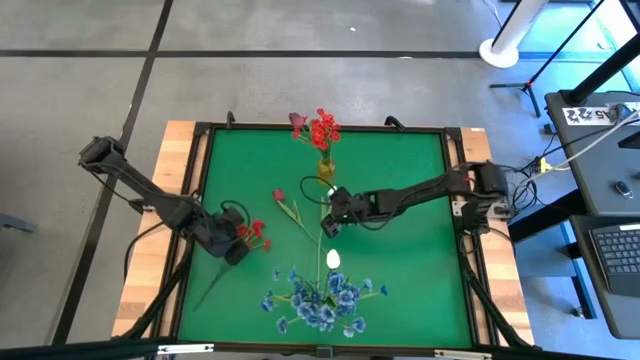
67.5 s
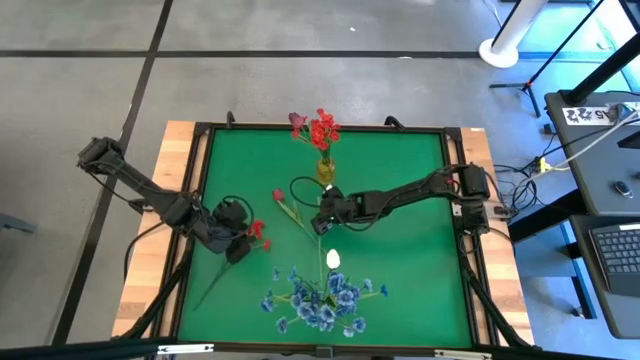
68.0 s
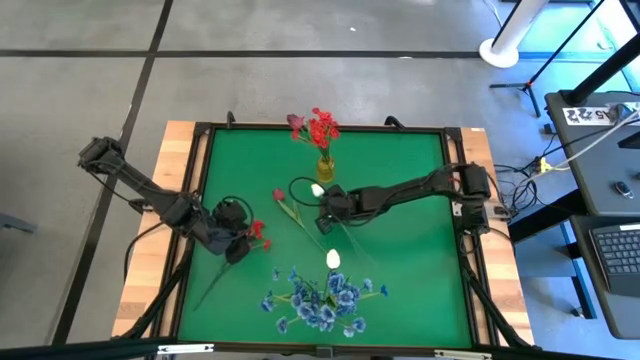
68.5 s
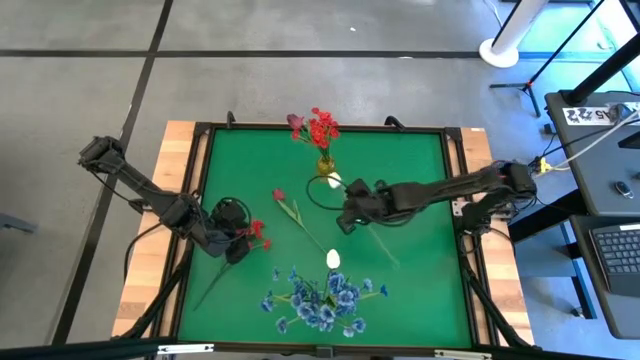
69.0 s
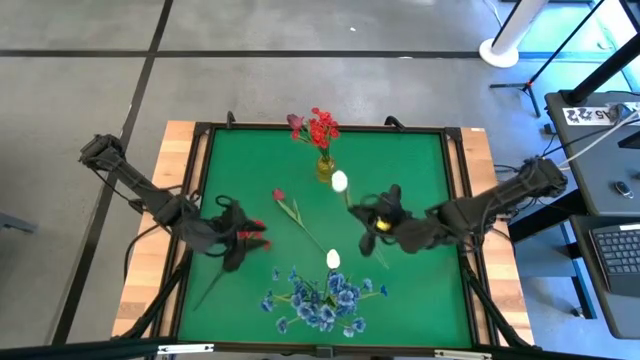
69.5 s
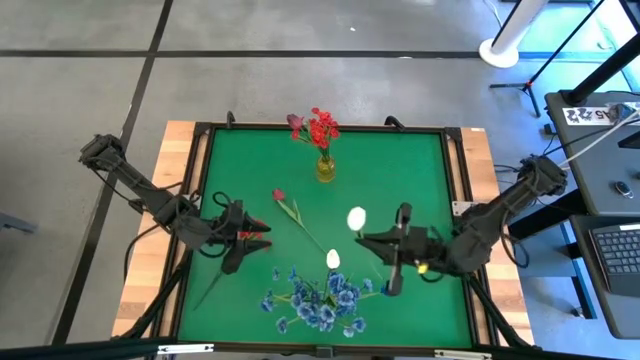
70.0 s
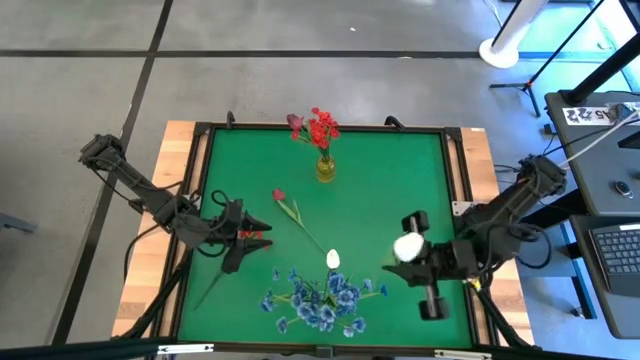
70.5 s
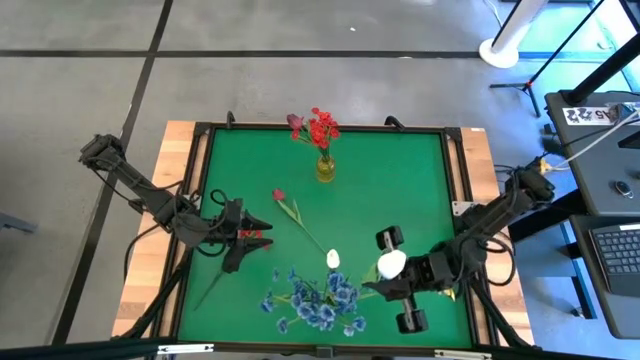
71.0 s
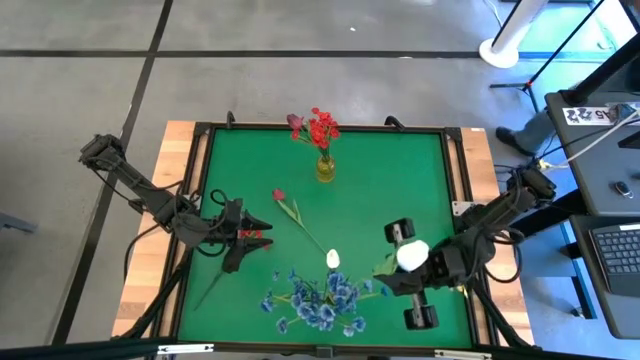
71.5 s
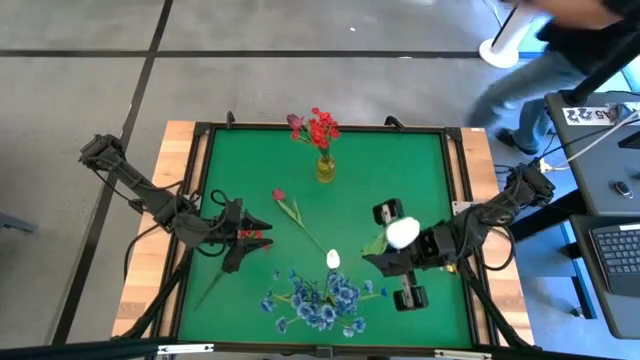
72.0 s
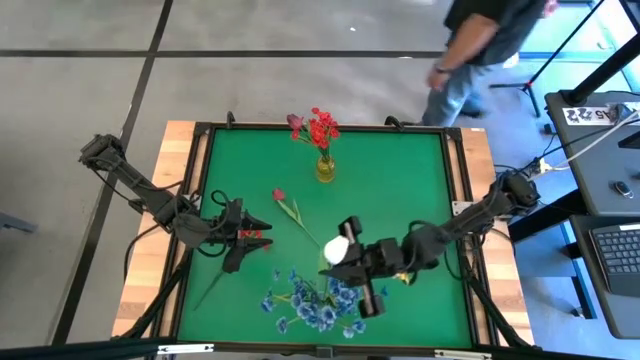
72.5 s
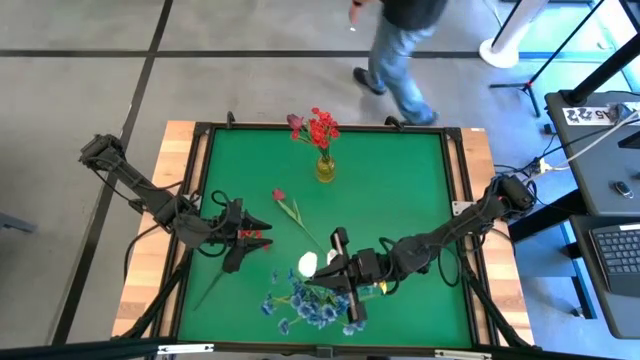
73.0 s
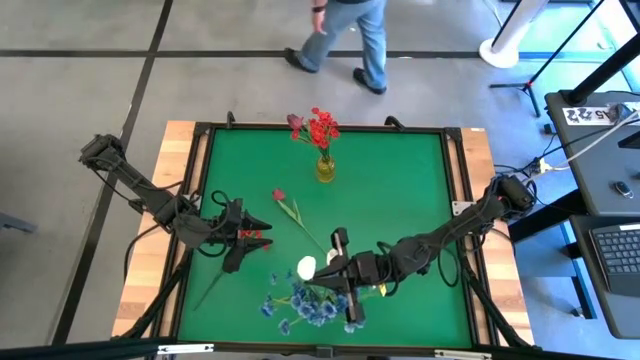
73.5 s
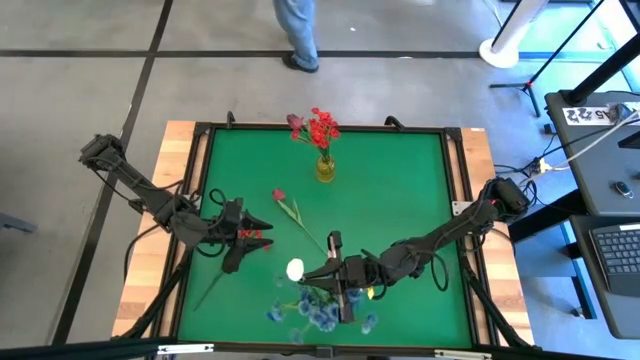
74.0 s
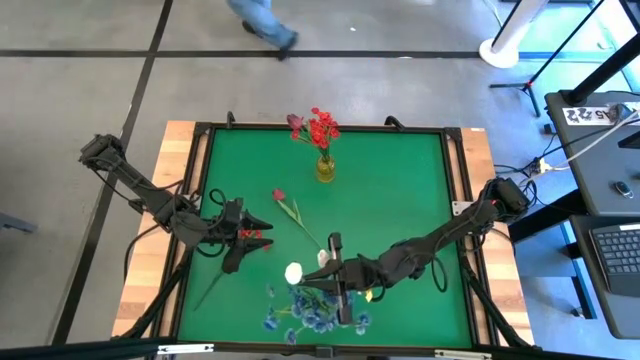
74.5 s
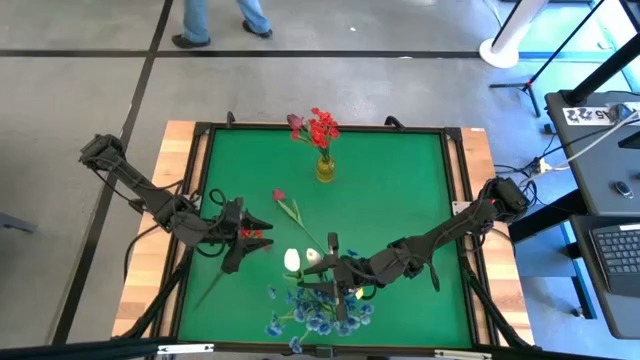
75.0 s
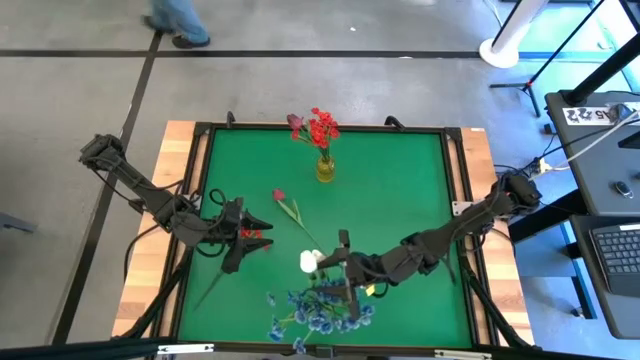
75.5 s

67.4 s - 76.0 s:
Task: Sort flowers into vase by color
Put the white tulip into the transparent vase

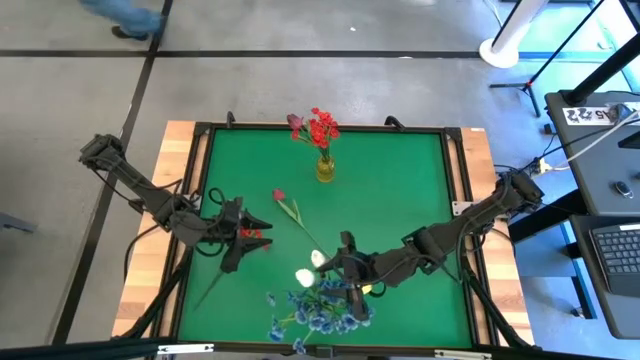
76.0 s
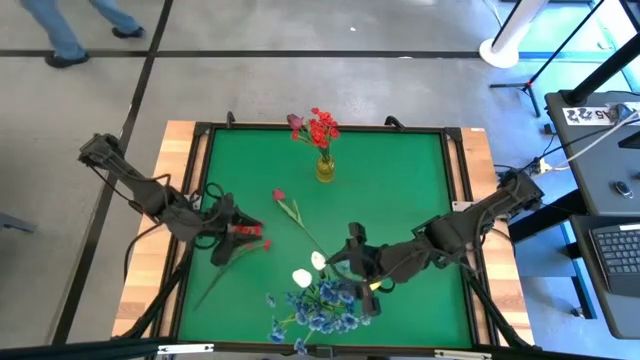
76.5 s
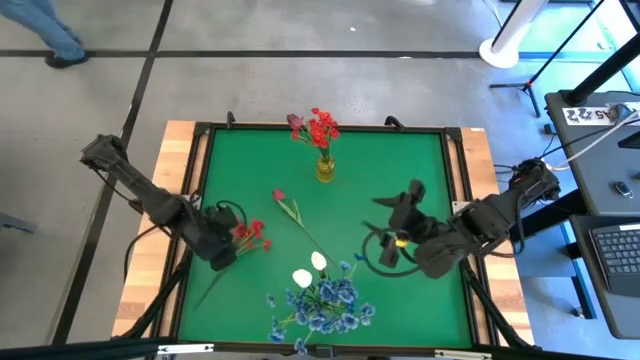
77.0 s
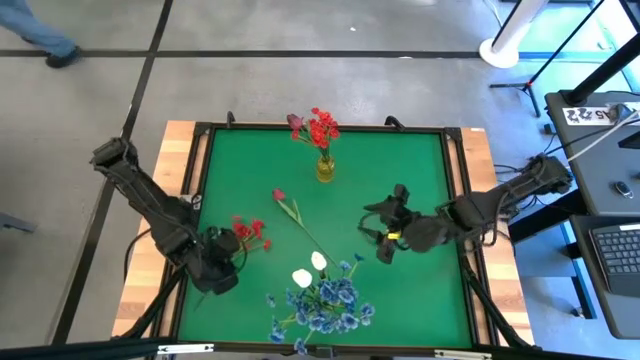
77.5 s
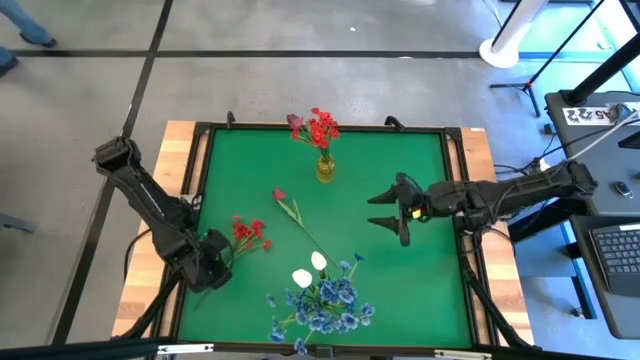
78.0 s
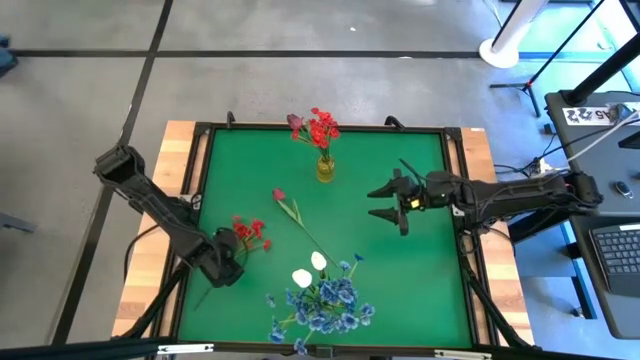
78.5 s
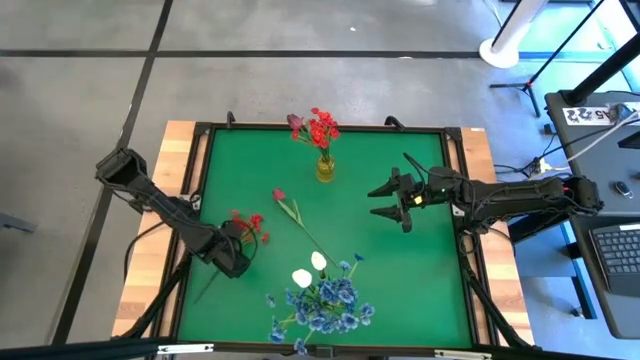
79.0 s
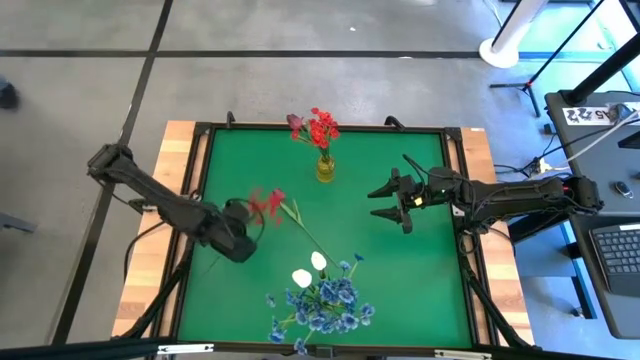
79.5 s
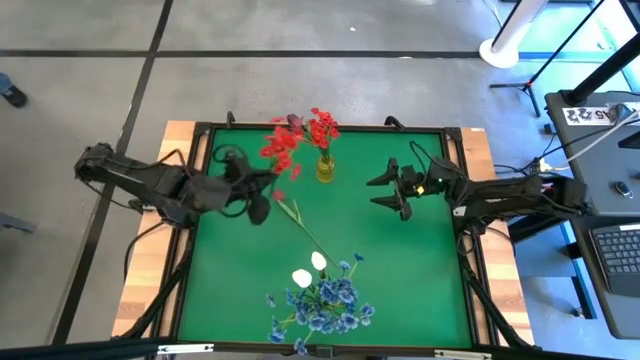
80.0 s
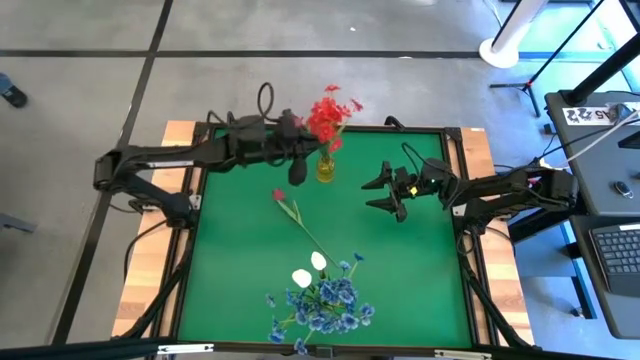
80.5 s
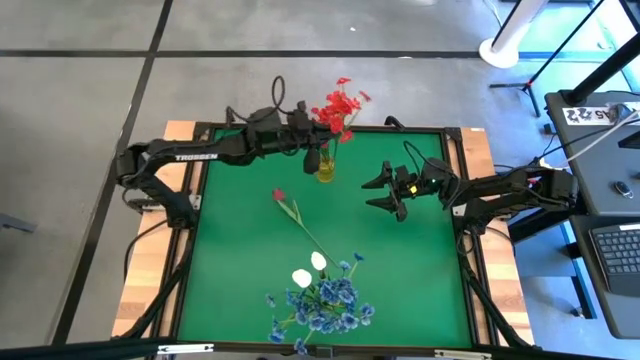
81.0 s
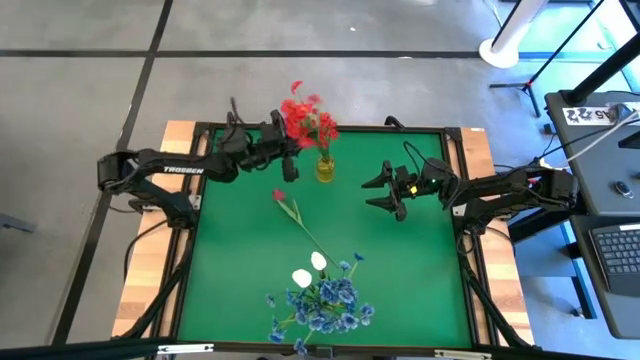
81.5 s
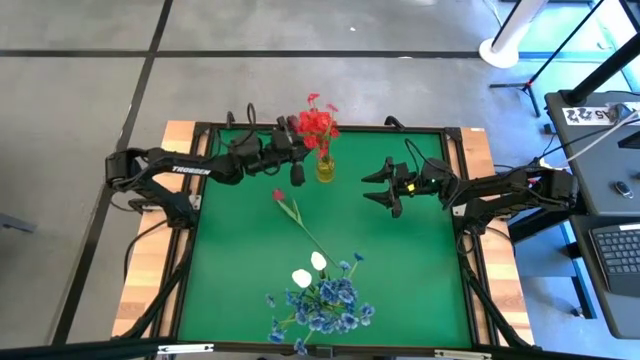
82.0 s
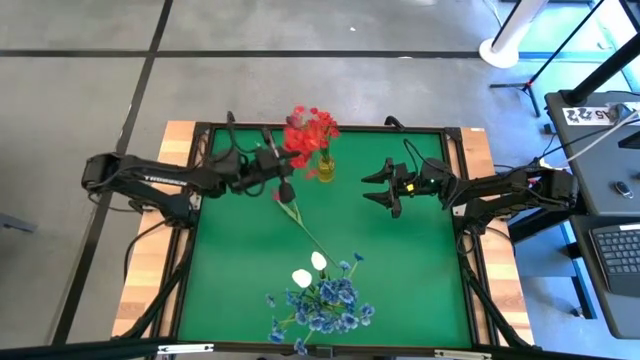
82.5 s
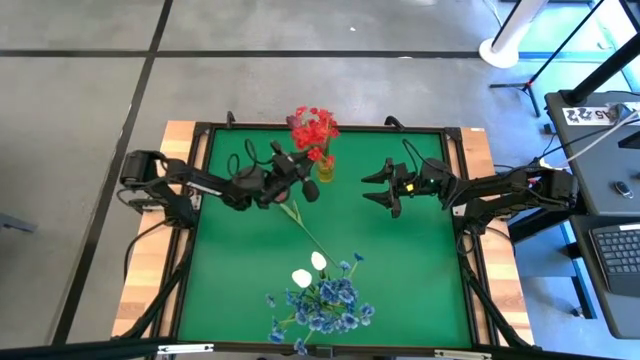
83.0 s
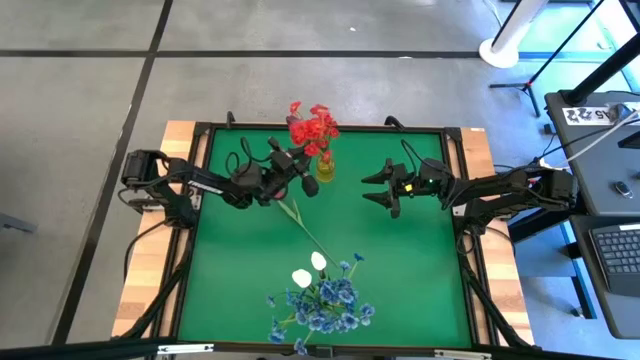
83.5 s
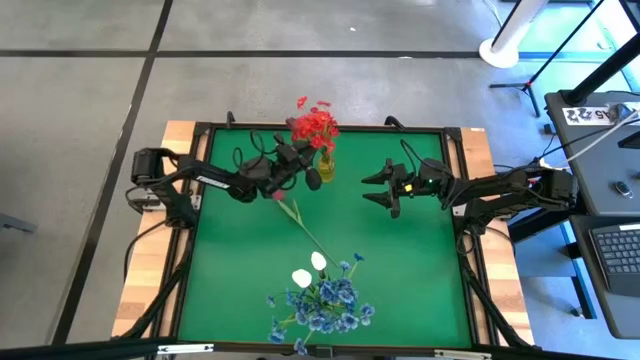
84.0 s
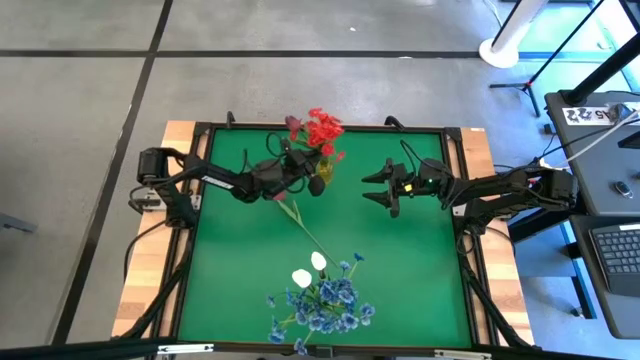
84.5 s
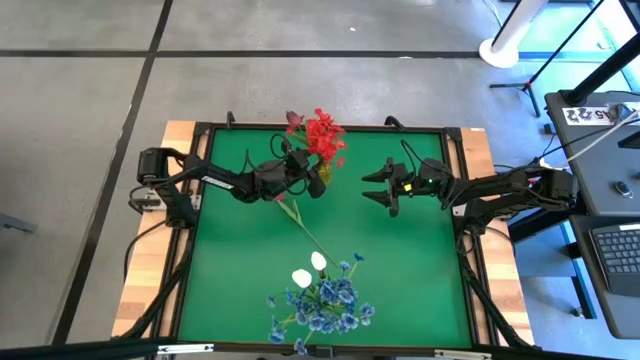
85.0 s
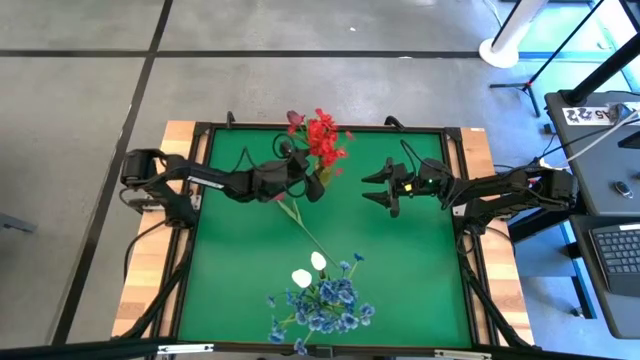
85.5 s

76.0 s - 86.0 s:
Put the red flowers into the yellow vase

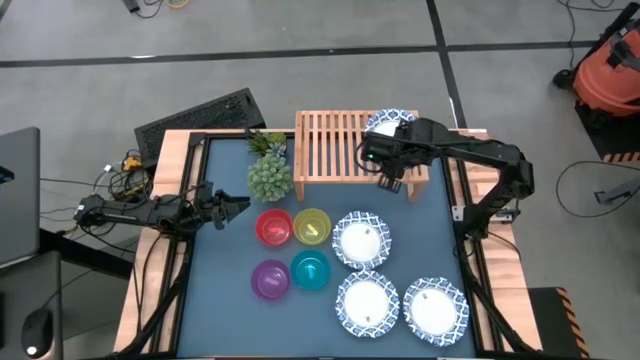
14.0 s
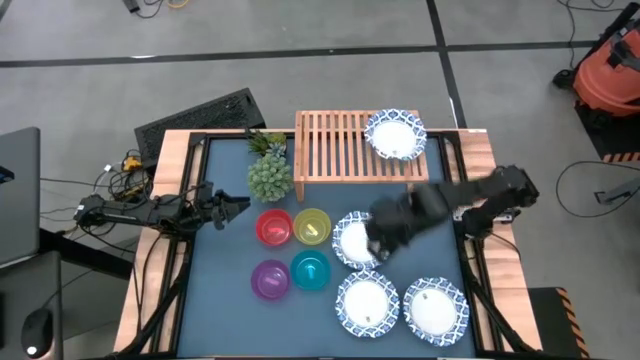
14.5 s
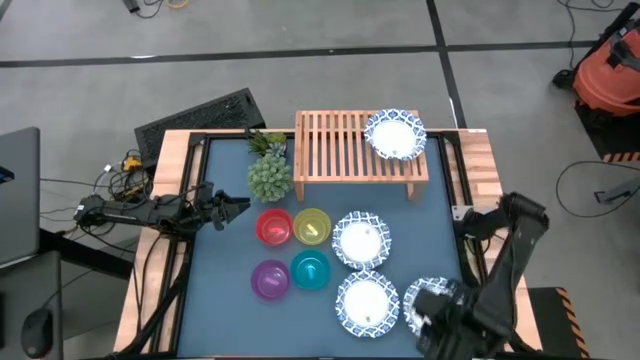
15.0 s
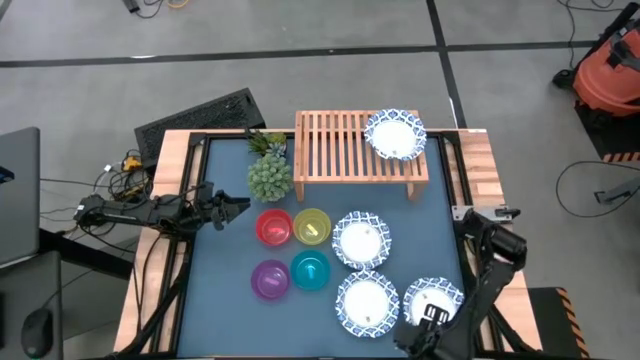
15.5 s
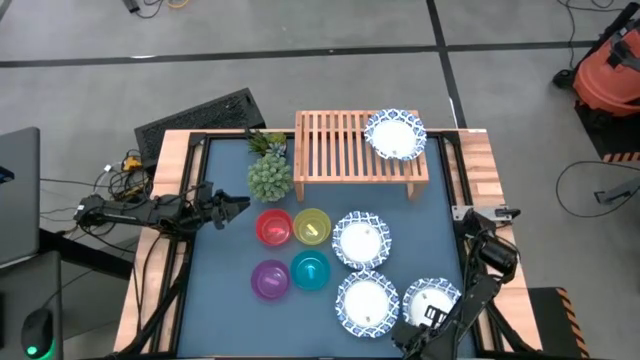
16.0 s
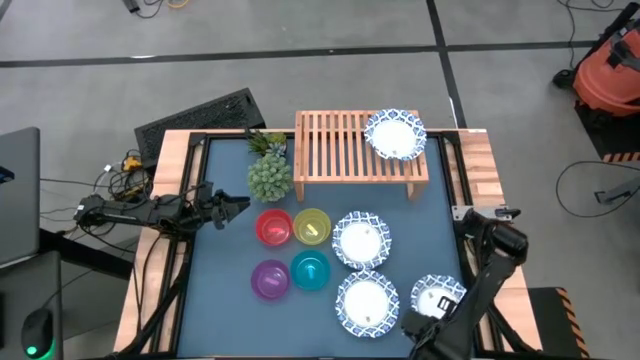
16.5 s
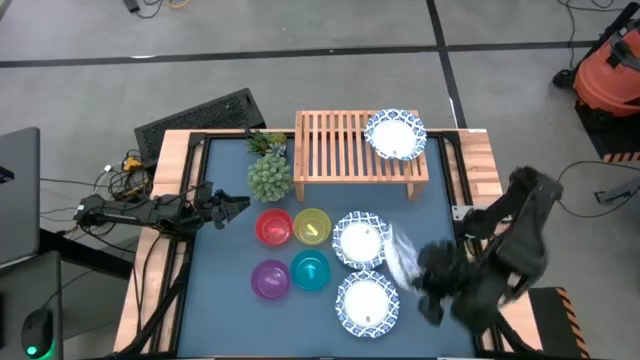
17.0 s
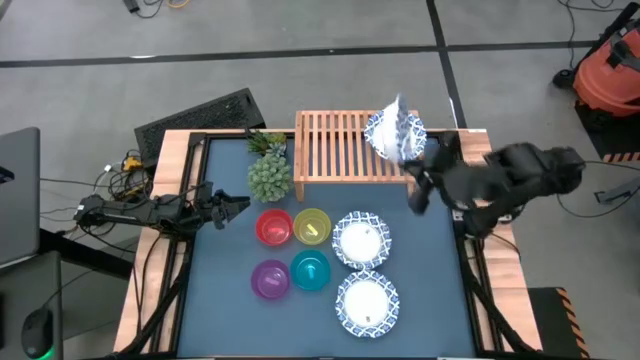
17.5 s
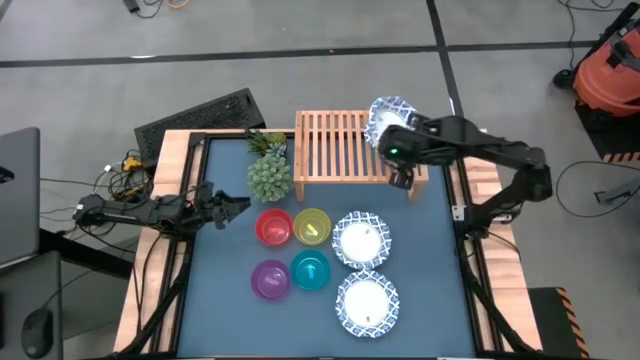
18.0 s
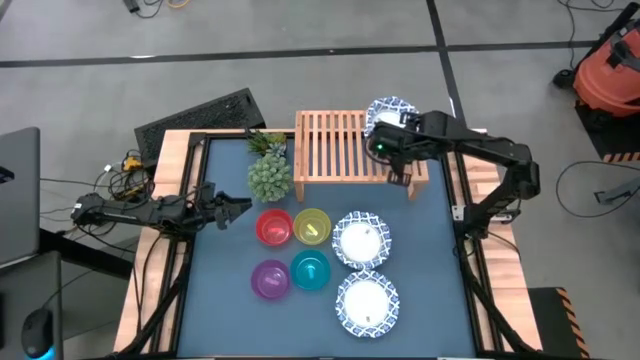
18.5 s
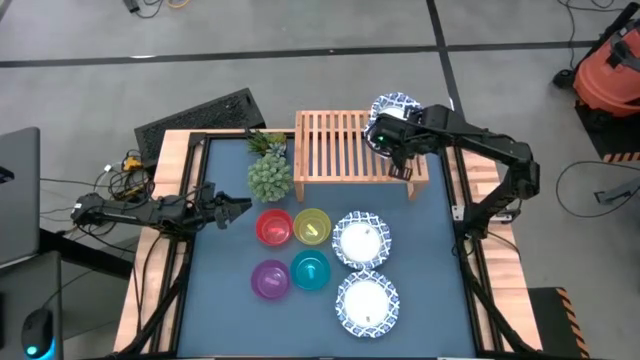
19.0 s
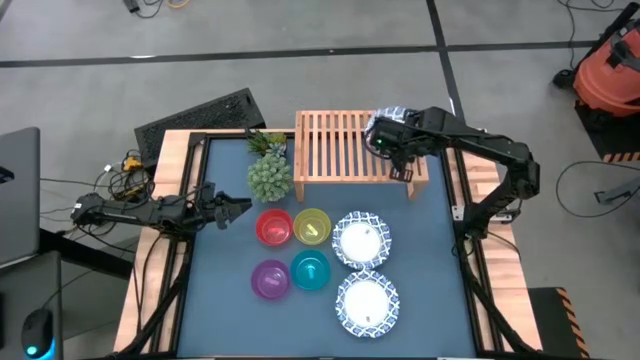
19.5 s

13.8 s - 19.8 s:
Task: Place and stack bowls onto a shelf
Stack the white patterned bowl on top of the white patterned bowl on the shelf
